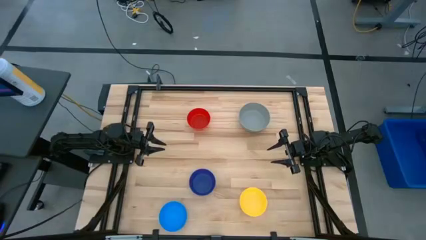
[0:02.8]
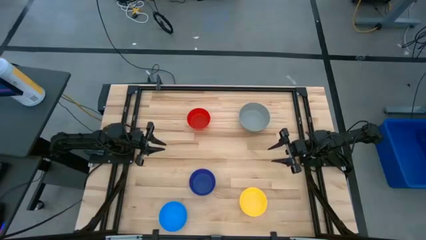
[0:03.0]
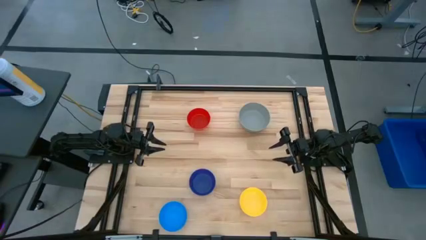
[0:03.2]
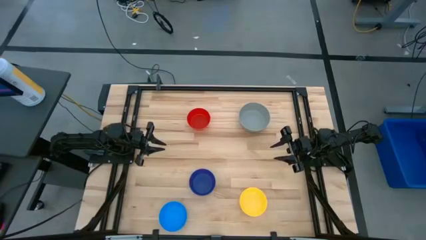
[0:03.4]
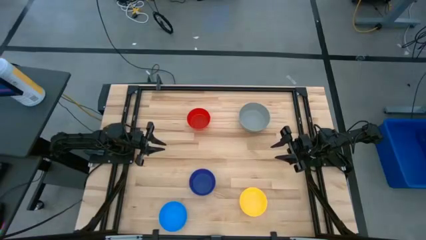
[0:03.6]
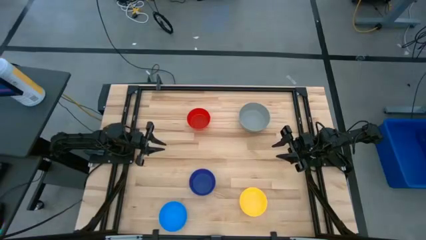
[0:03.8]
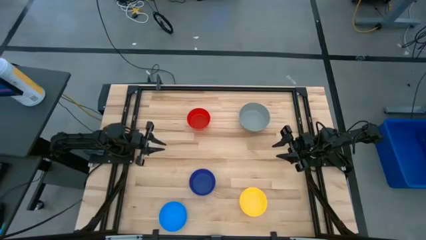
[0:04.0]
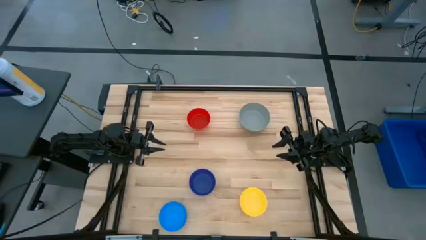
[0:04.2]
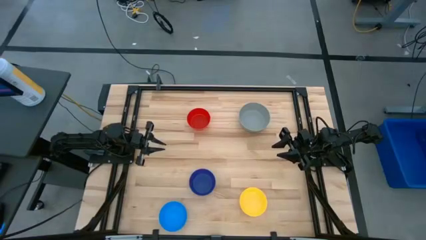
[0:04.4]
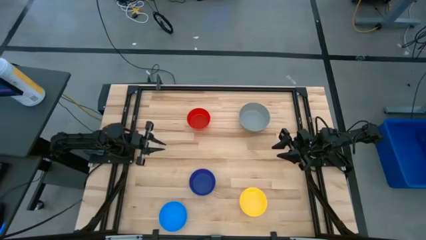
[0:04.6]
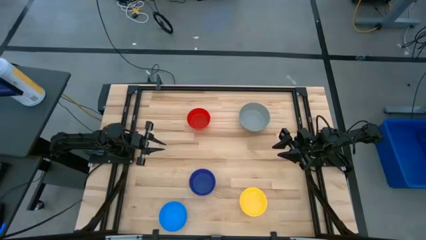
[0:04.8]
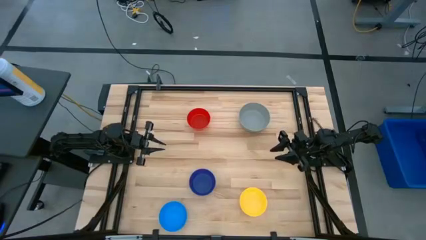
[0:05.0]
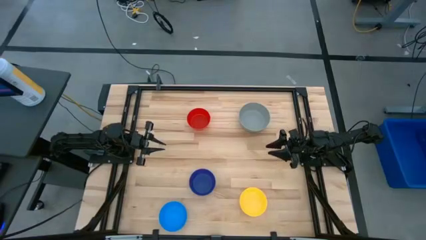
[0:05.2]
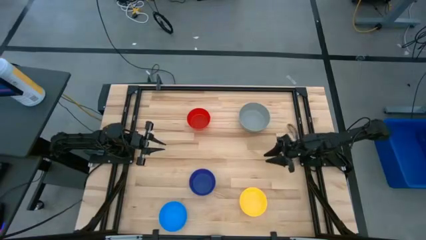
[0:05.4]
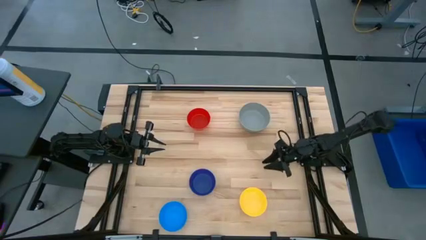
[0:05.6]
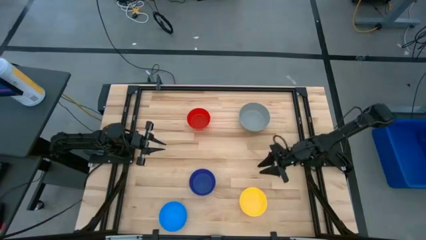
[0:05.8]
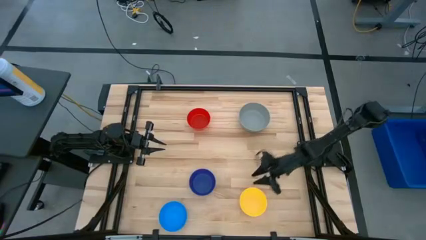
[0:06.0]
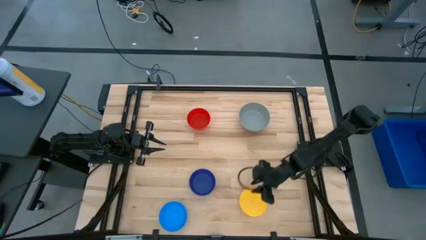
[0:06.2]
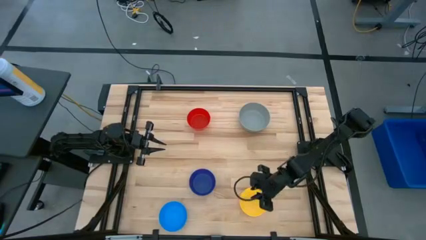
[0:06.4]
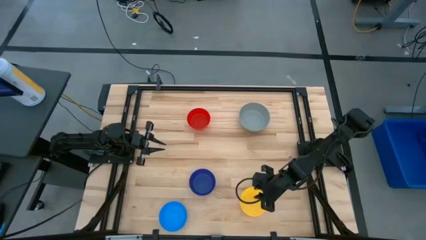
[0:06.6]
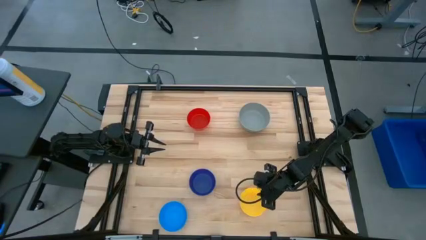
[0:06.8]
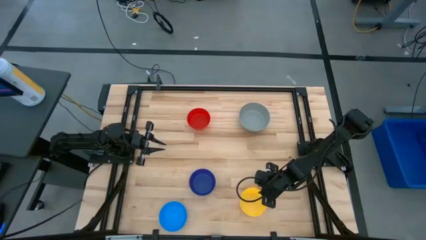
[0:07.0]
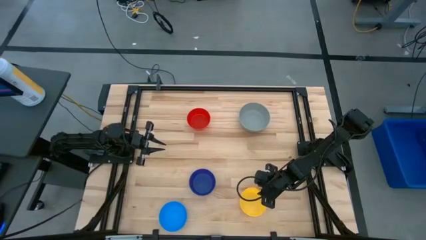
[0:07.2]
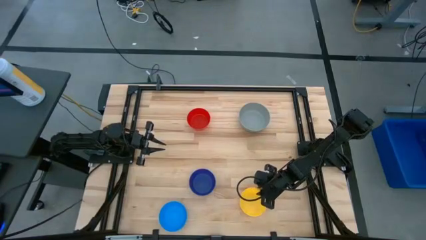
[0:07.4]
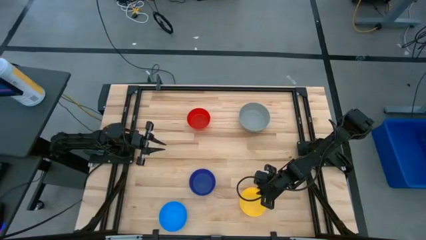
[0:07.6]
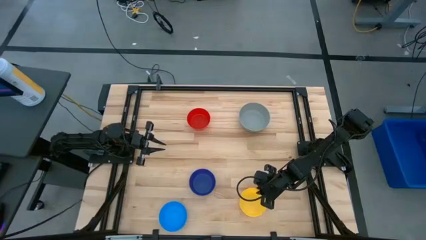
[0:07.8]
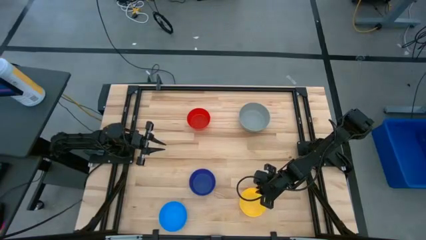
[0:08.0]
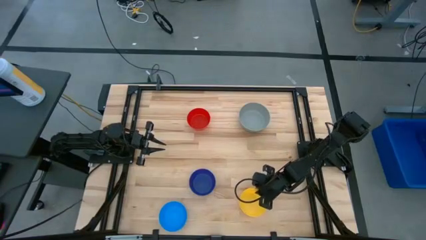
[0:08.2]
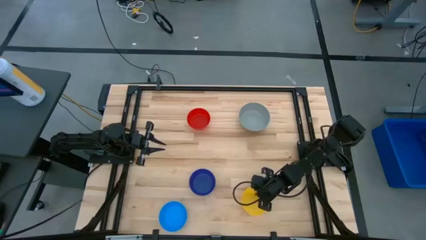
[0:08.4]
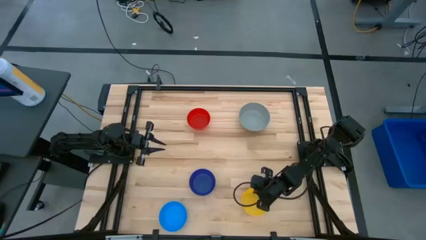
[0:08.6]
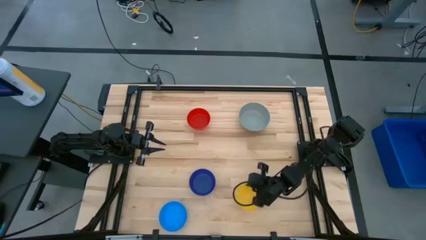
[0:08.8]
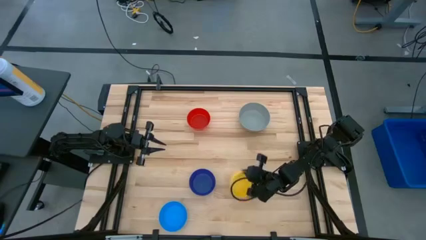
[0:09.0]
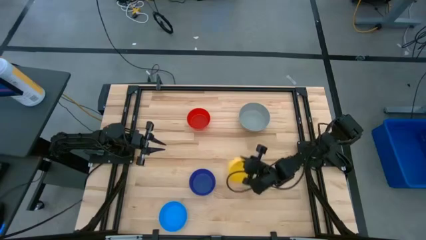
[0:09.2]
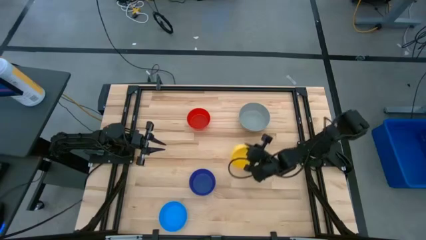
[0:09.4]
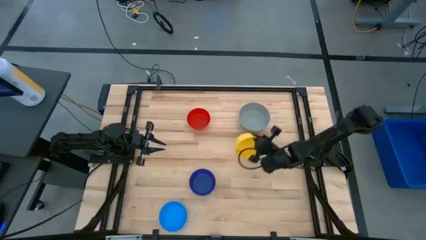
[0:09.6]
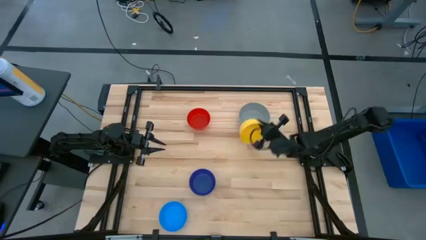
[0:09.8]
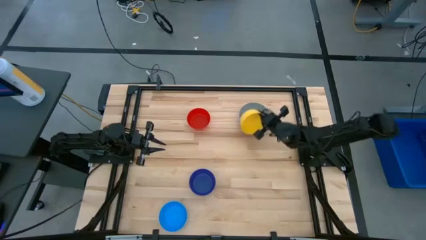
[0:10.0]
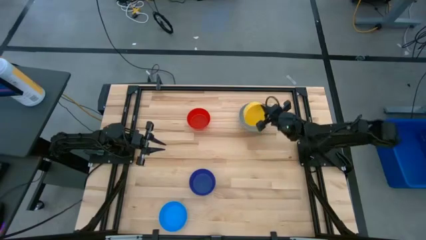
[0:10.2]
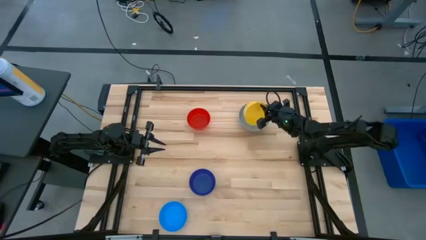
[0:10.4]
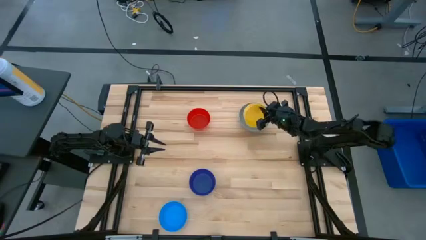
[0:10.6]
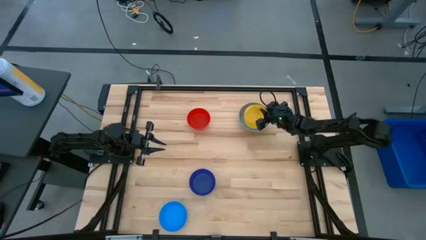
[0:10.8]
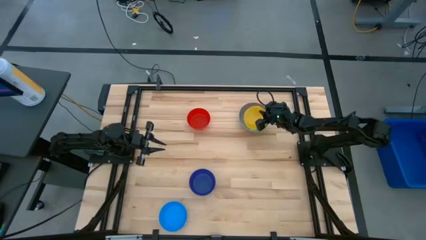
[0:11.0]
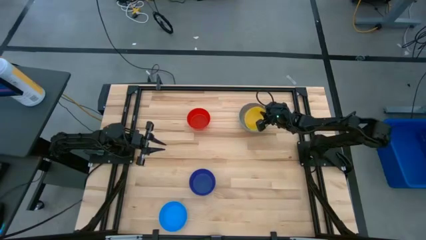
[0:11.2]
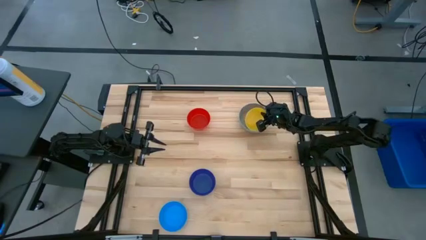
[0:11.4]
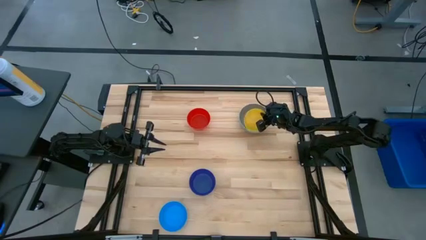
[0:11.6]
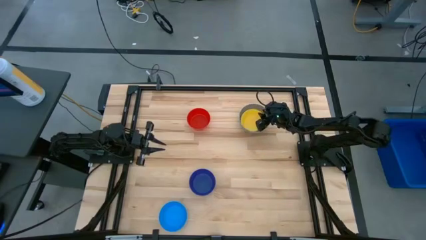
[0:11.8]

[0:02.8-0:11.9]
Stack the yellow bowl on top of the gray bowl

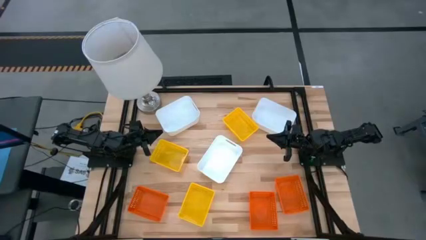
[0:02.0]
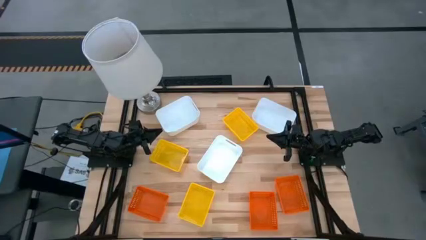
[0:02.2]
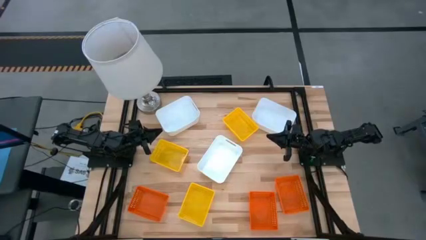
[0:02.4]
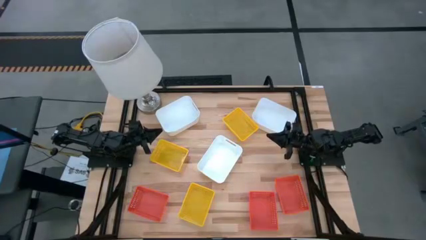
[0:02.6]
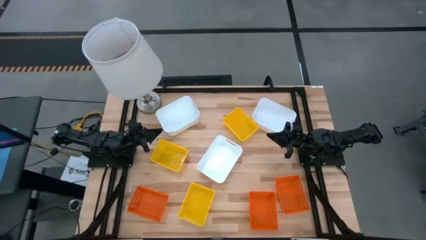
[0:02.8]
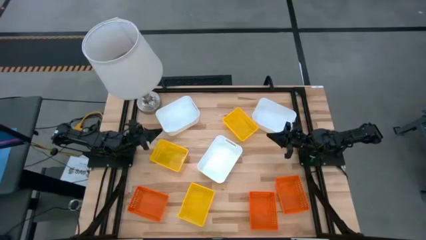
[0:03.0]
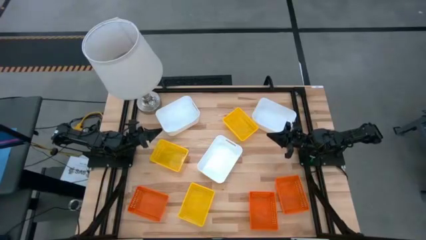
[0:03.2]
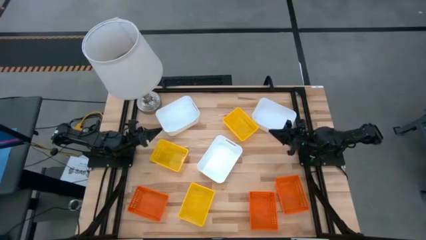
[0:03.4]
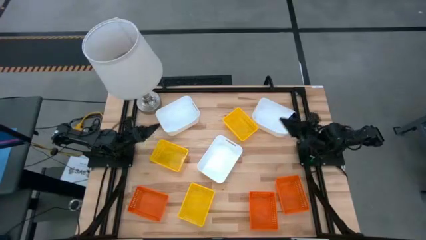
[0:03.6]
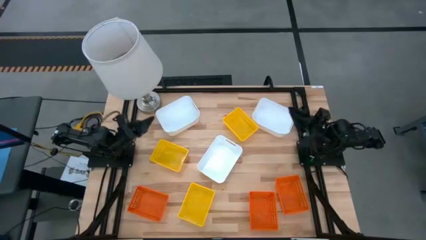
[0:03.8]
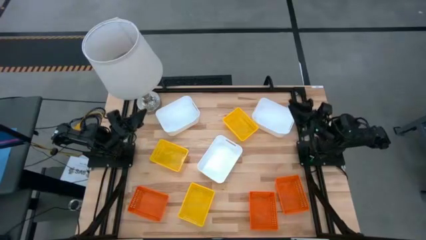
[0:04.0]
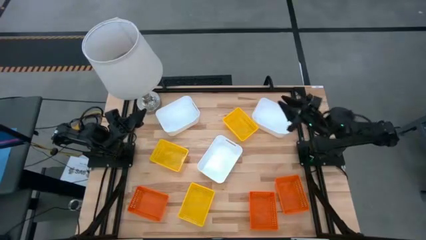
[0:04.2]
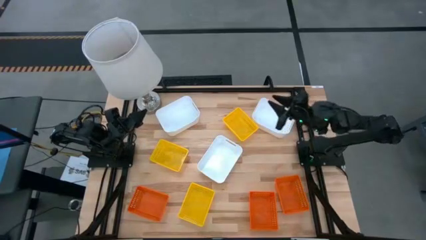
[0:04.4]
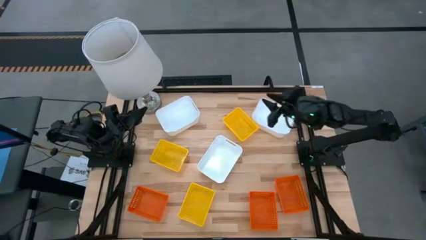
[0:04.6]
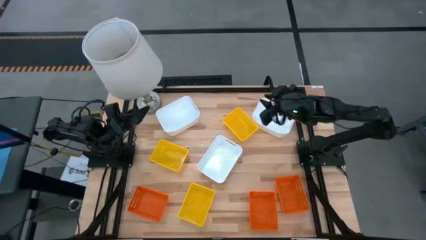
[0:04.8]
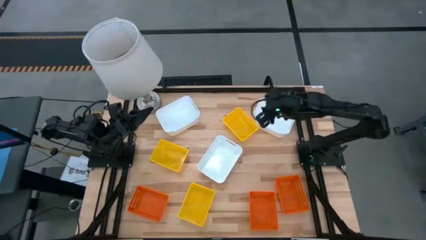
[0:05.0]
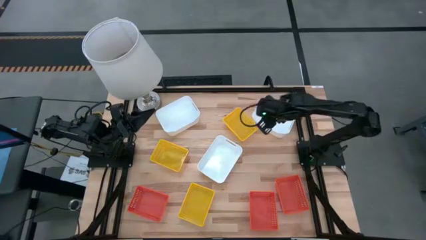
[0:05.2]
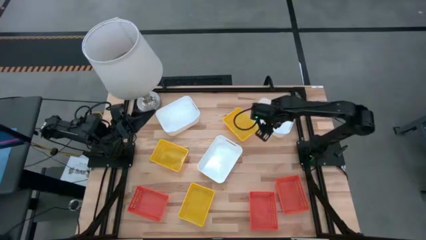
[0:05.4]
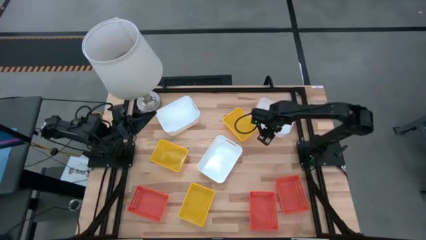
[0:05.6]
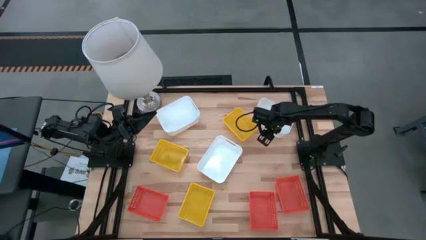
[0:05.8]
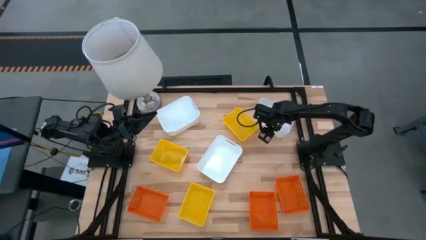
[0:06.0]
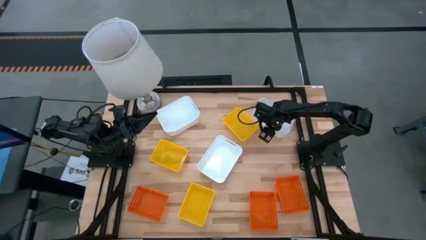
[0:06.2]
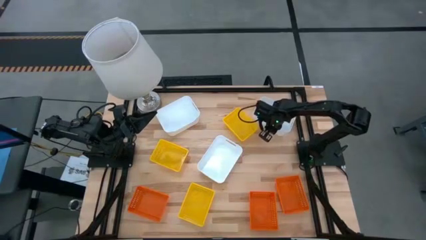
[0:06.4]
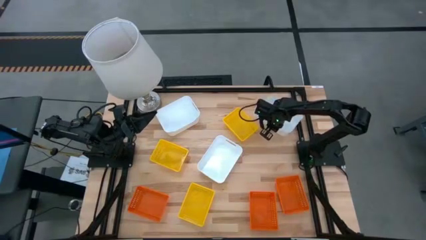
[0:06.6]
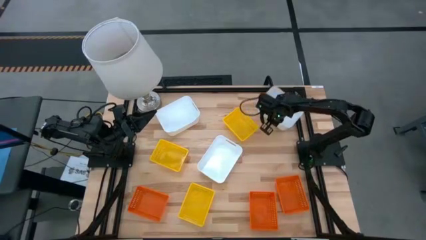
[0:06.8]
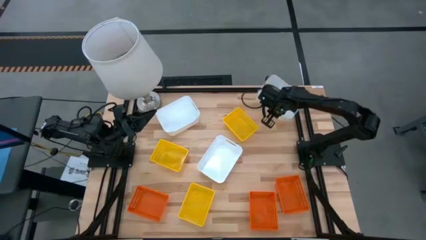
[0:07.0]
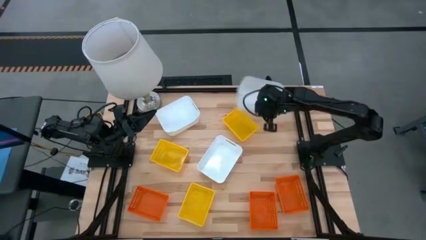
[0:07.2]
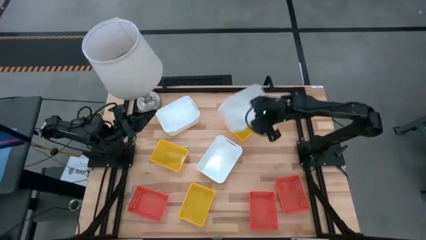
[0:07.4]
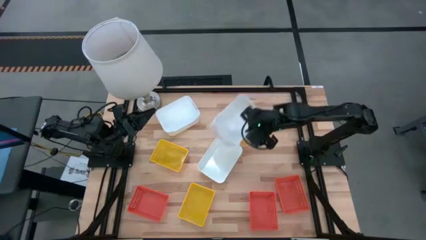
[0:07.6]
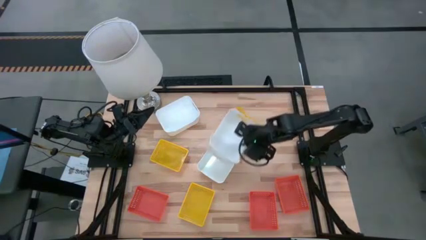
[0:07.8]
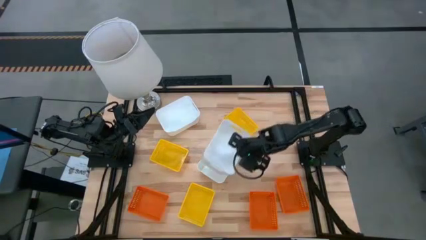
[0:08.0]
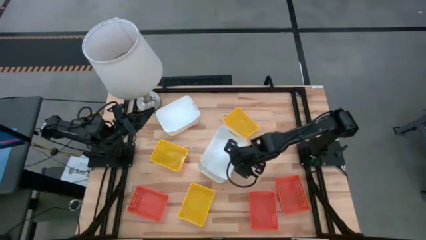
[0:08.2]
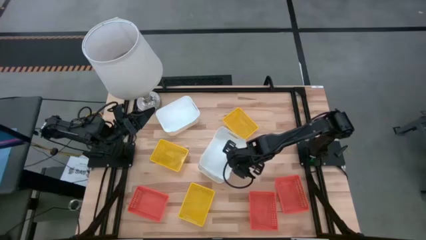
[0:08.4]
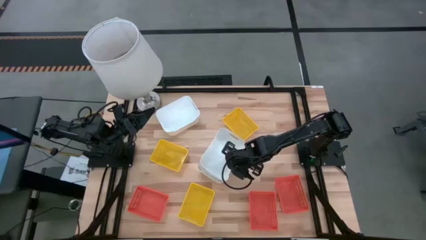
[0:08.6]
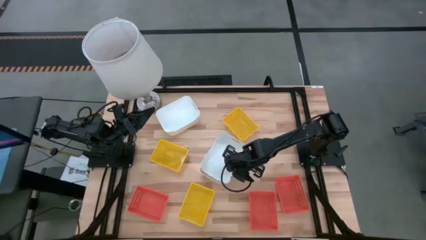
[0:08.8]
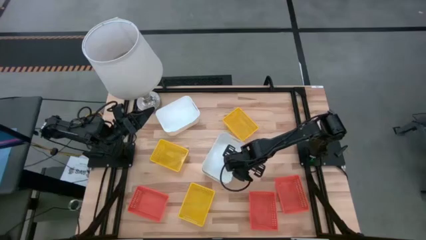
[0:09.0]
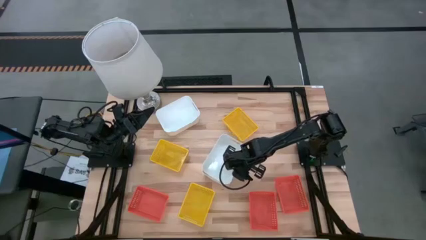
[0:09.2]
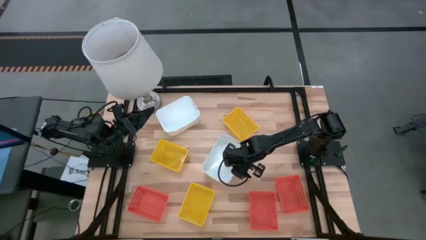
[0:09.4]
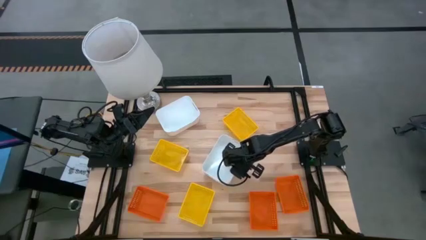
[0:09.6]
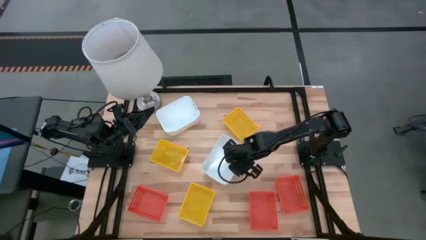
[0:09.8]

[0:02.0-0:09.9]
Stack the top right white bin on the bottom white bin
